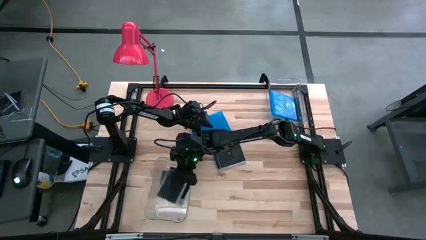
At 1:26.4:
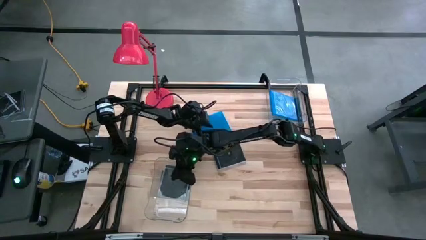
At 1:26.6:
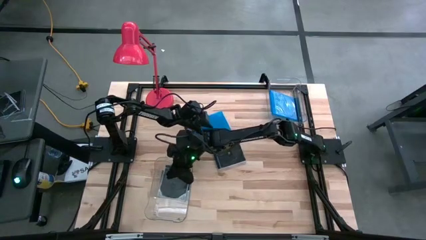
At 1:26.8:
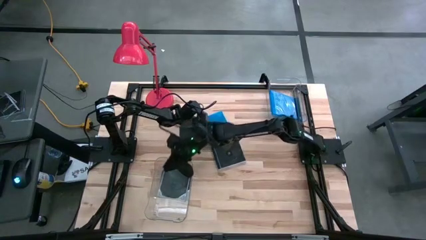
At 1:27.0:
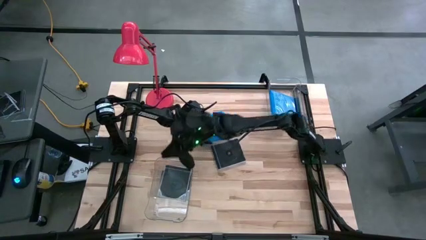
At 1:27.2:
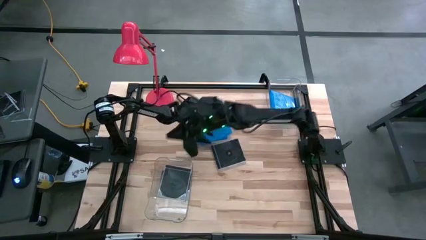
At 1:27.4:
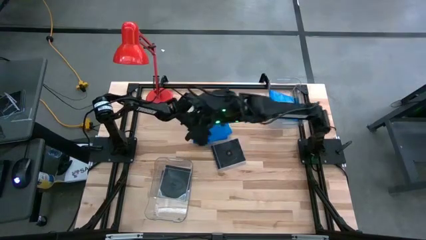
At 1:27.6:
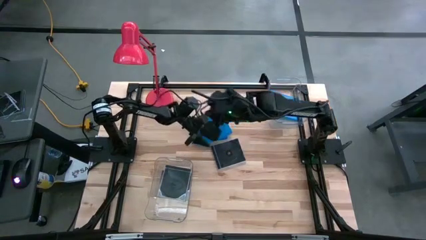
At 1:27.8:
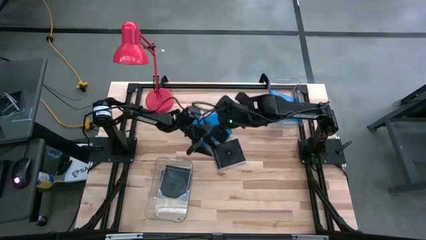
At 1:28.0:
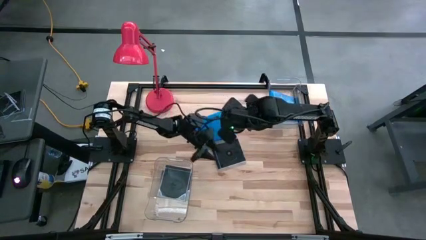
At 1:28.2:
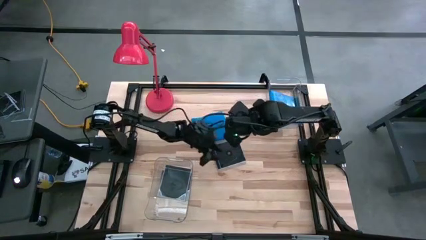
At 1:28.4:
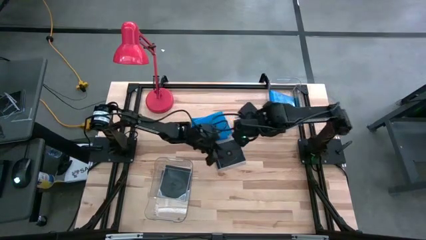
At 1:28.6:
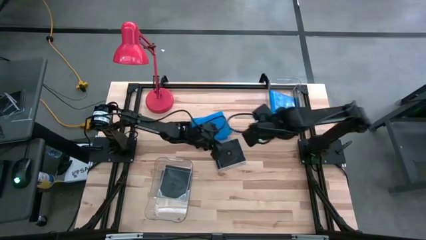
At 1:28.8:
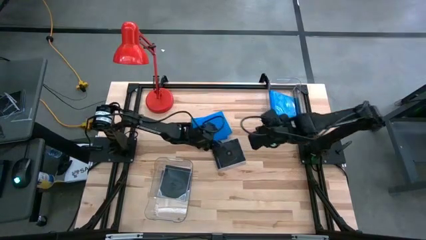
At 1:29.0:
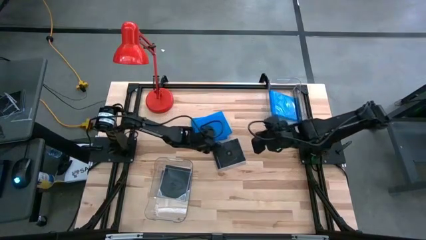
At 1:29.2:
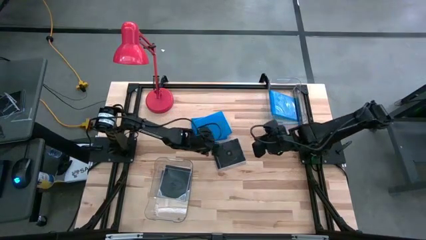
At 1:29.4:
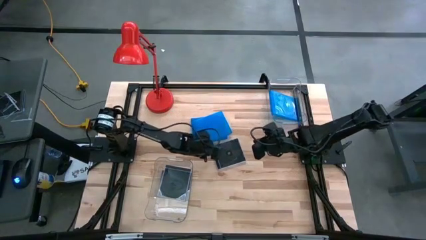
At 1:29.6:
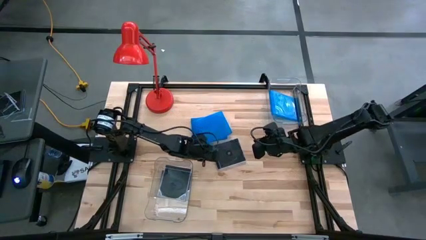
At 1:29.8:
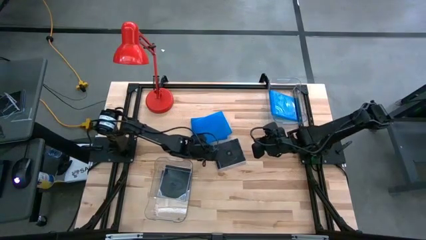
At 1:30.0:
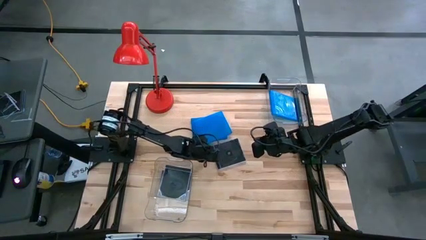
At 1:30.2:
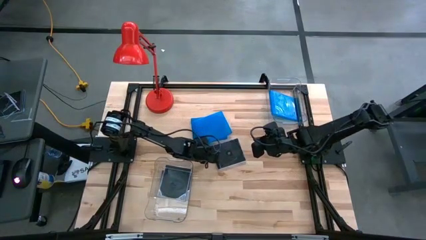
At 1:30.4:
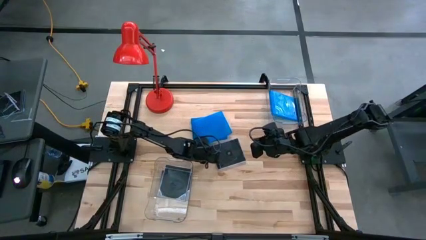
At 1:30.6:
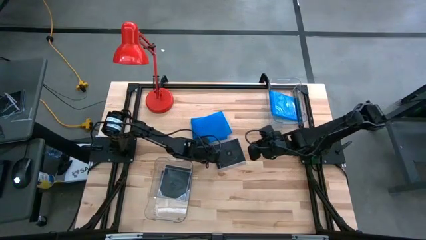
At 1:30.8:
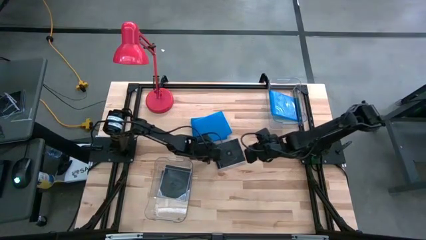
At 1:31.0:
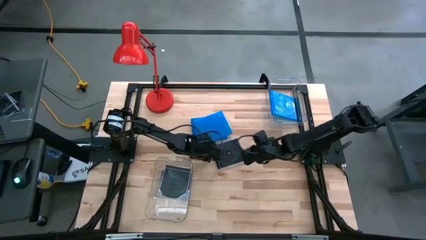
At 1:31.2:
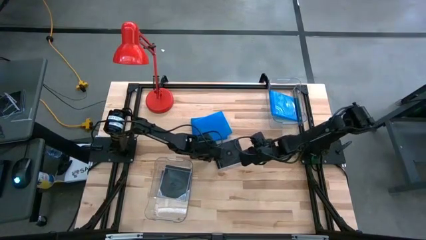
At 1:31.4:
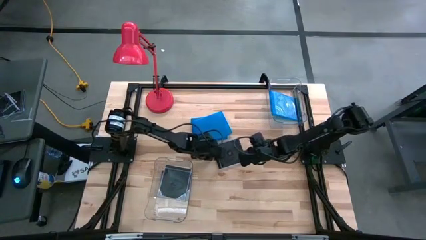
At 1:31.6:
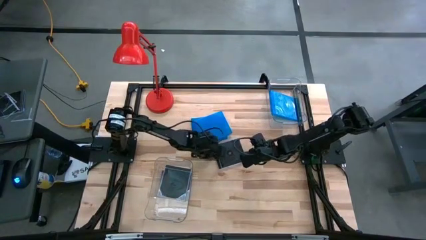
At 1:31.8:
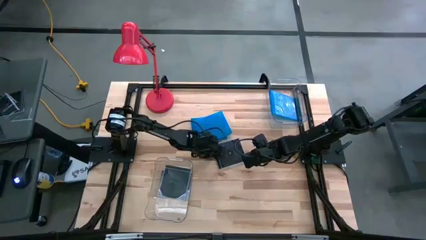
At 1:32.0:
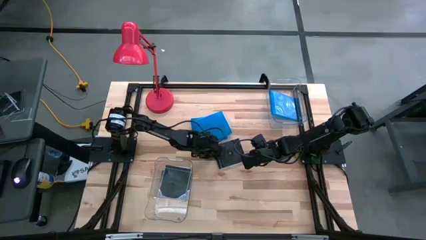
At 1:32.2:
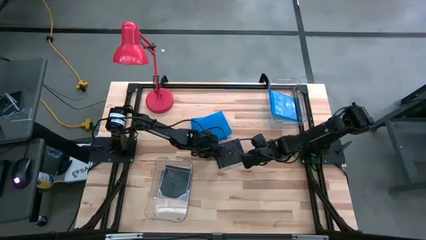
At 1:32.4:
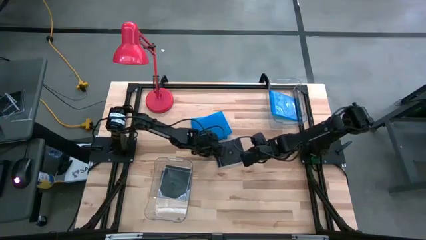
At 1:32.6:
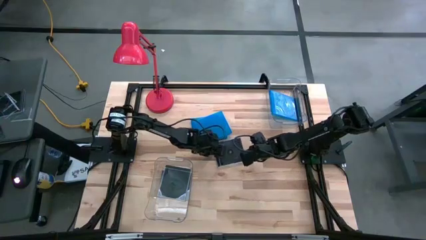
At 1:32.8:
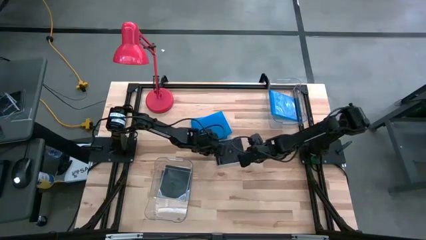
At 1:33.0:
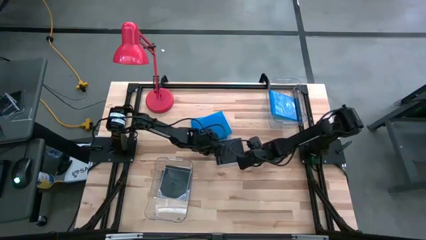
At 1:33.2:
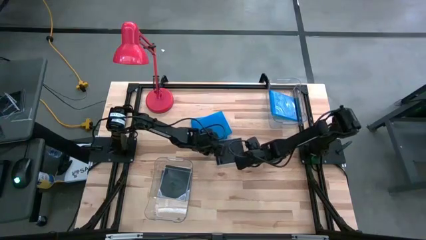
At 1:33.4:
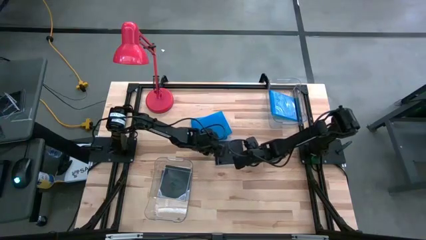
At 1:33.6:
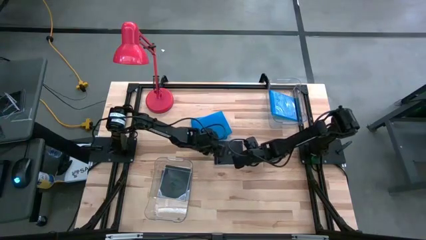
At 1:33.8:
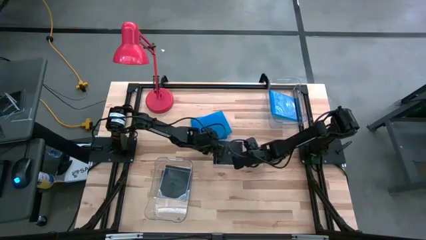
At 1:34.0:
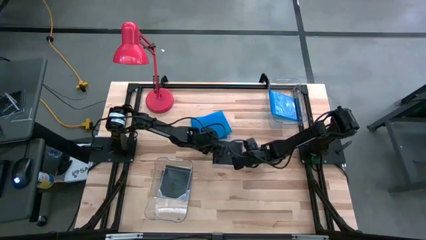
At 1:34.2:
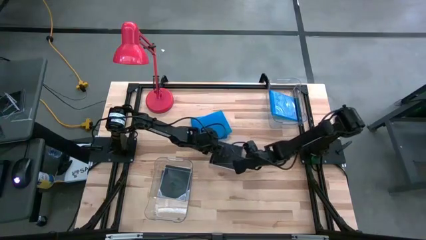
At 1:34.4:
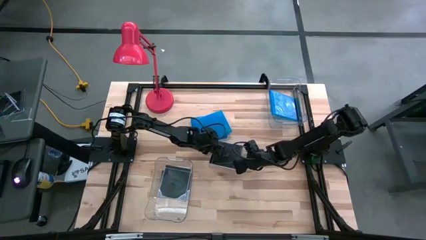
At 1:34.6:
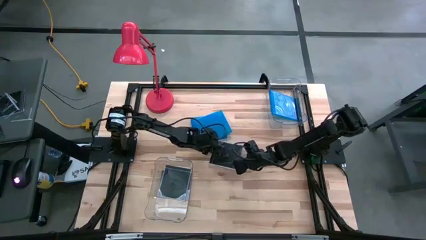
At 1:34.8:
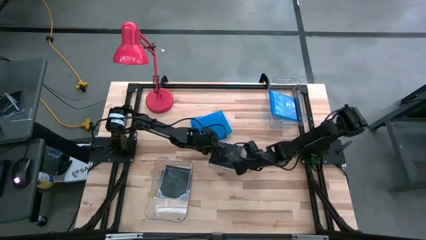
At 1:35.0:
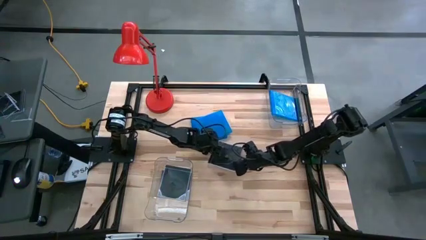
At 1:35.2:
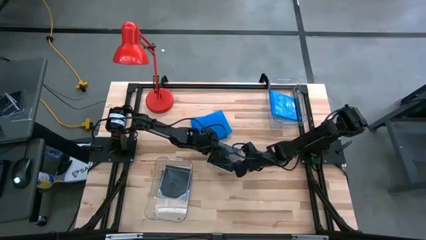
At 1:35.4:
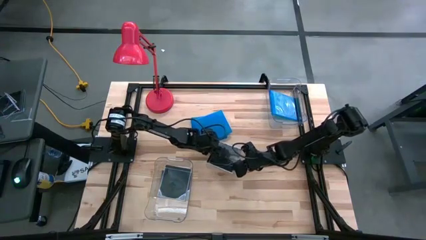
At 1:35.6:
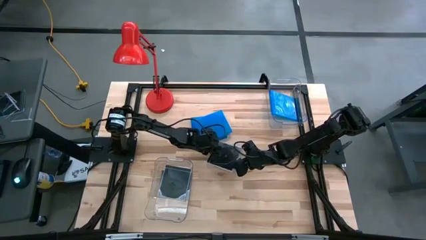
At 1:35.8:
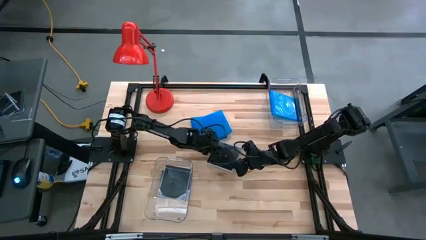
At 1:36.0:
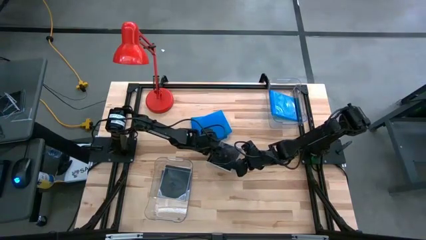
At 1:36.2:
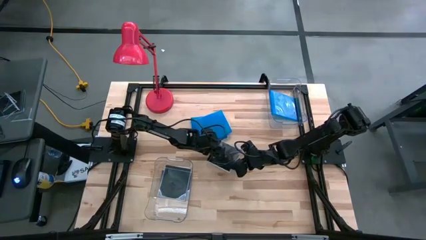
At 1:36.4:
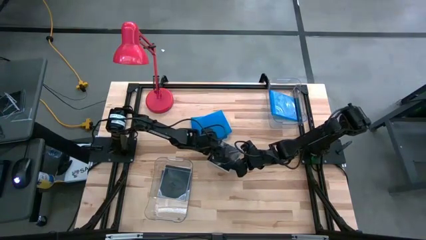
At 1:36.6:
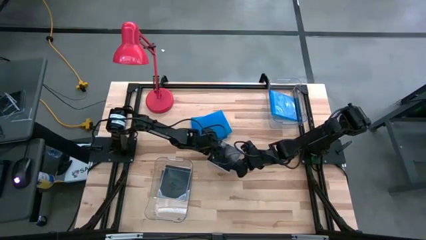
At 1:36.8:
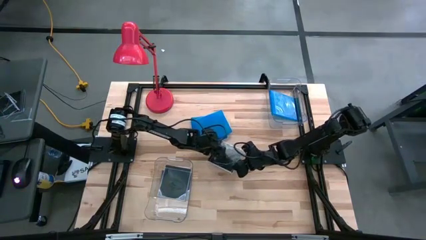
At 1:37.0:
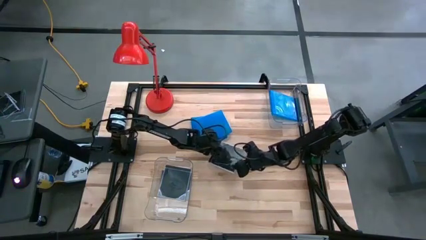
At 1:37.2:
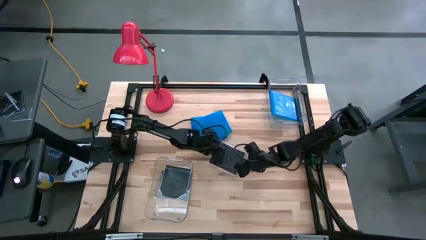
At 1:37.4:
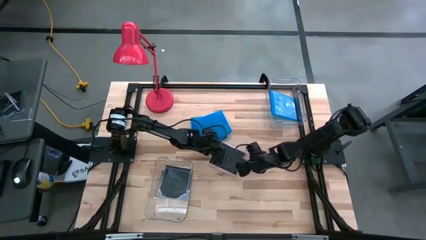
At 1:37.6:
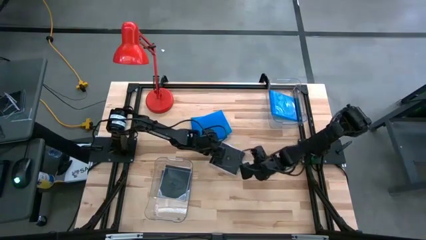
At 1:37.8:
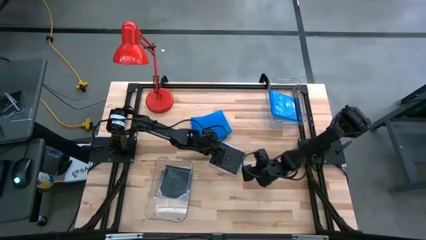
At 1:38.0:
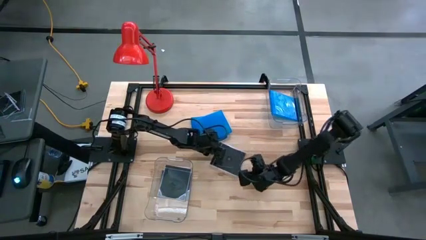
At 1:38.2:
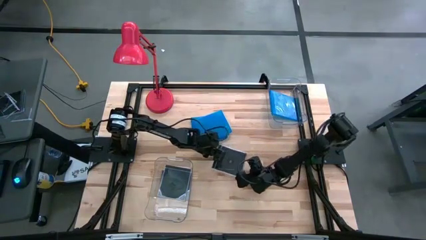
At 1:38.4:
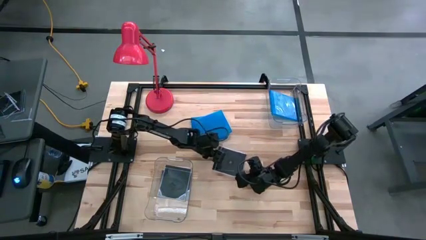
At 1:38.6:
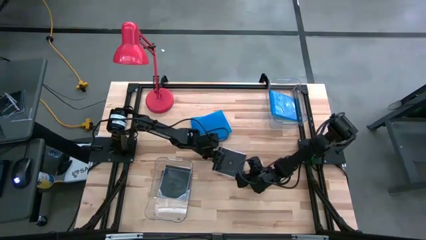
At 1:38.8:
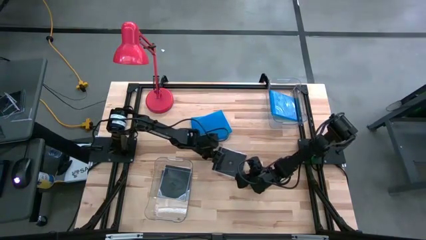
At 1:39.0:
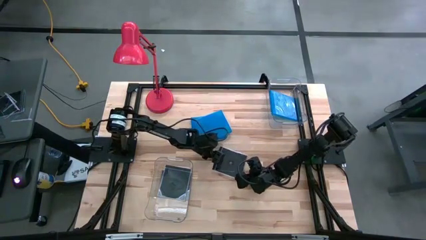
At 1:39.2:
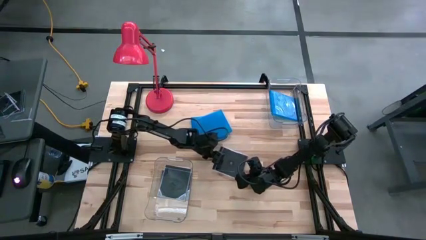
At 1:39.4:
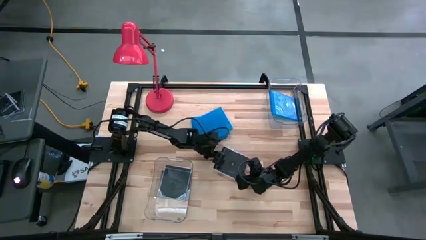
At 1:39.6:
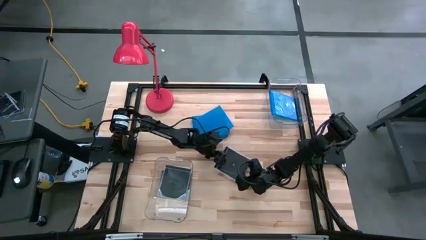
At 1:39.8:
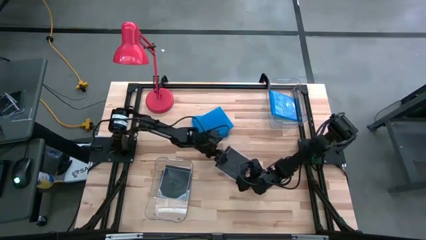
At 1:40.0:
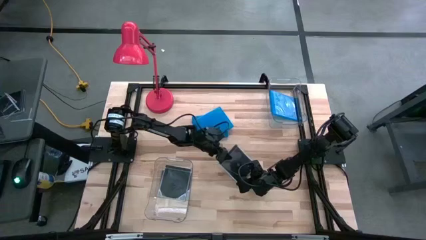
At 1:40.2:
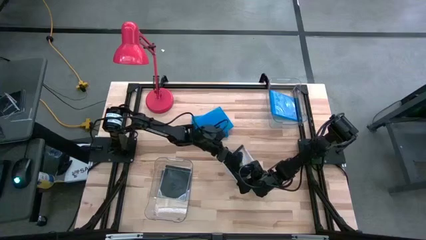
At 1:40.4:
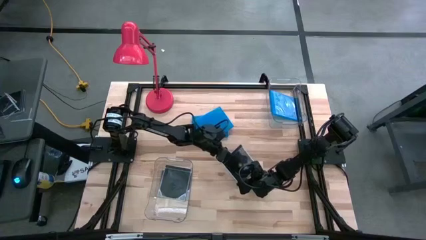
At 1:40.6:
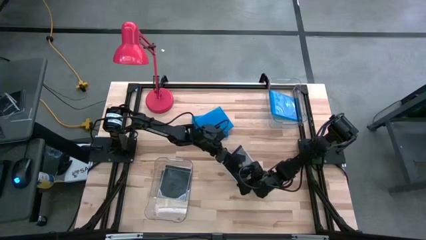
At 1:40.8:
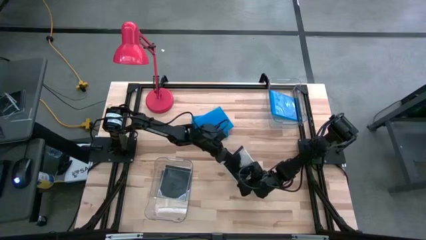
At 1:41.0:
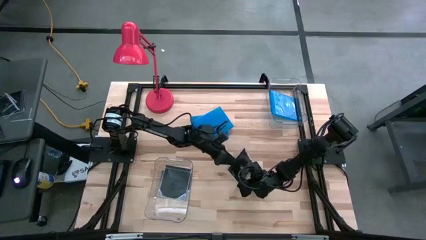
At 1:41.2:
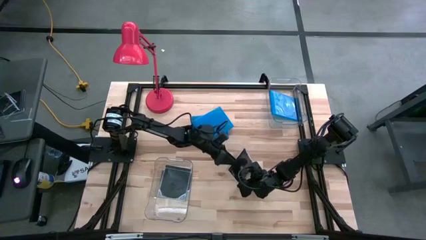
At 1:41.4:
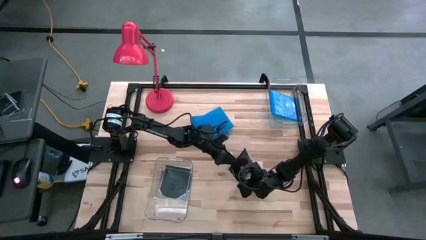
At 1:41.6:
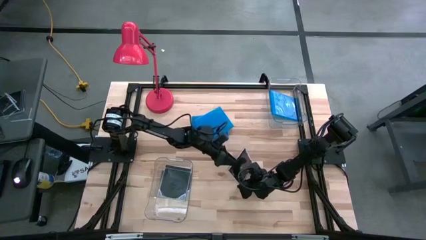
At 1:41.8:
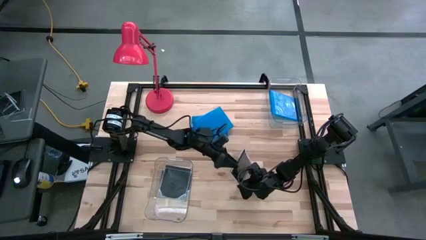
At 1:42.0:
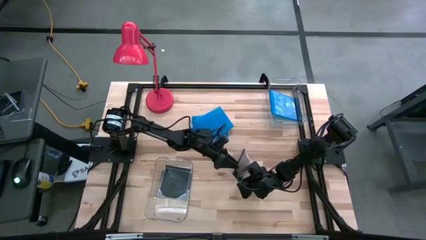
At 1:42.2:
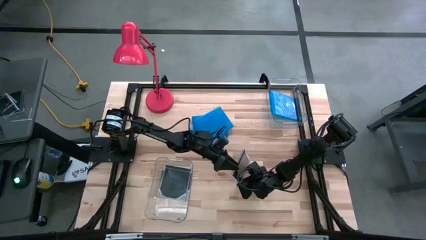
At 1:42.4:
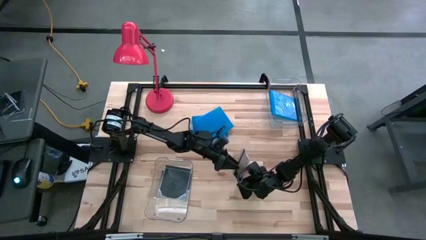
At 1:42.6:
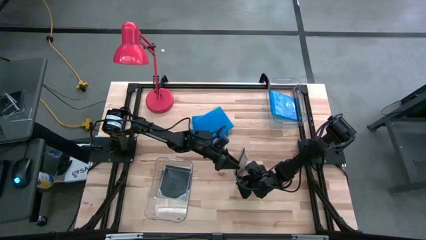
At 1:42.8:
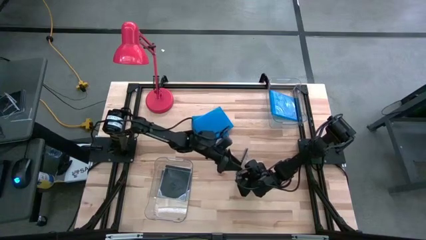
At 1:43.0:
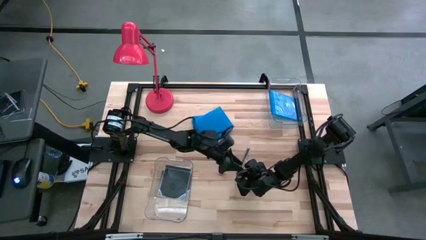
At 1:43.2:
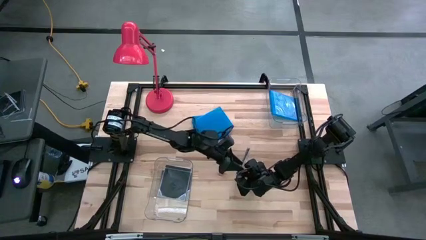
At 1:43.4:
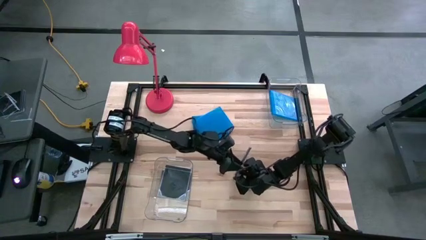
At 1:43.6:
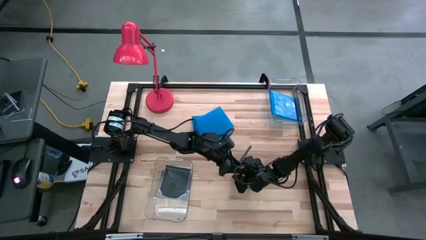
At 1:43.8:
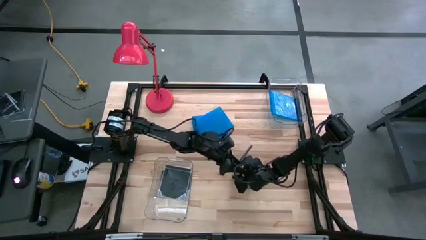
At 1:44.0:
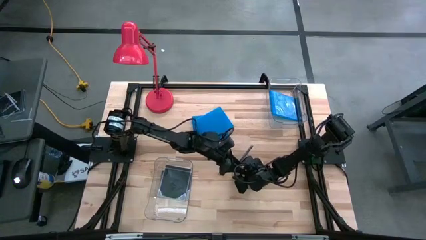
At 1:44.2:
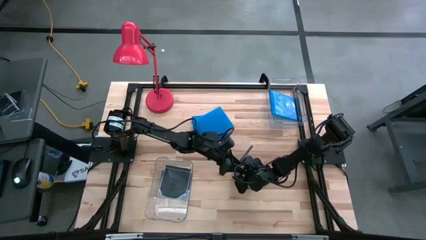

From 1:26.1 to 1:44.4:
Task: Pick & place jewel cases by type
Put the black cd case into the bottom transparent bin
